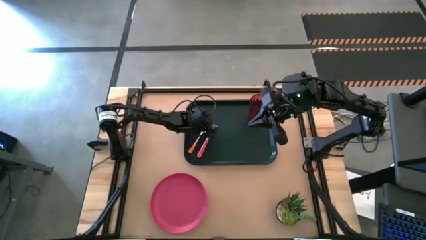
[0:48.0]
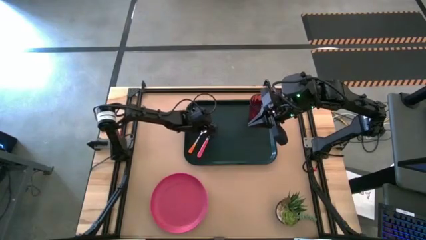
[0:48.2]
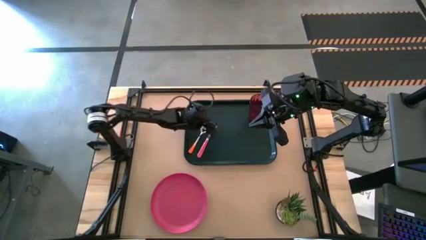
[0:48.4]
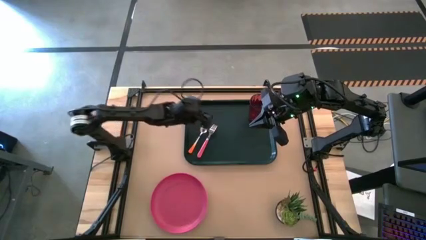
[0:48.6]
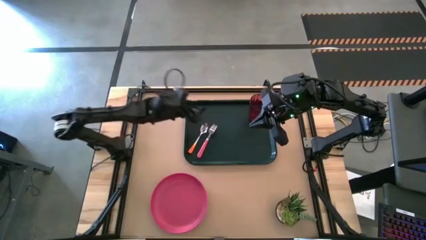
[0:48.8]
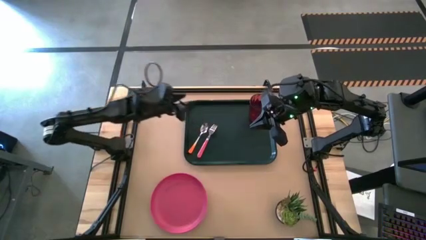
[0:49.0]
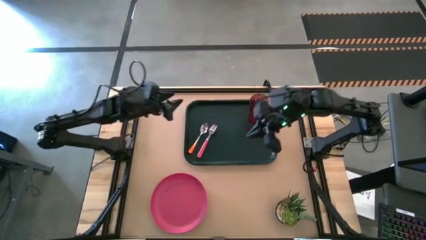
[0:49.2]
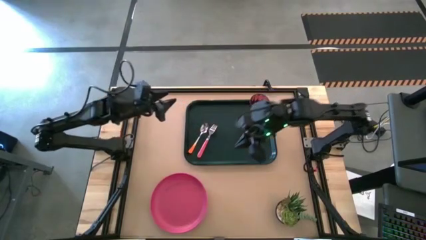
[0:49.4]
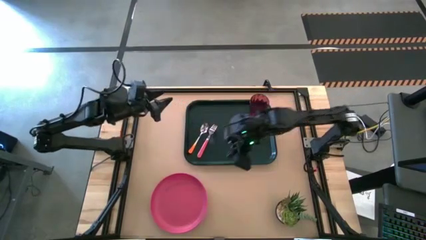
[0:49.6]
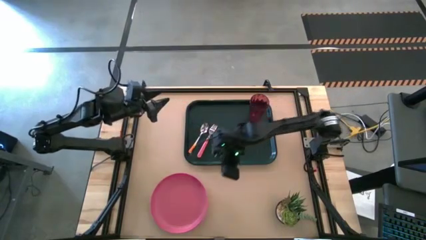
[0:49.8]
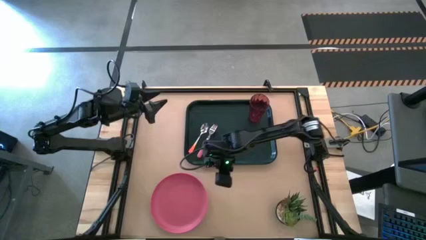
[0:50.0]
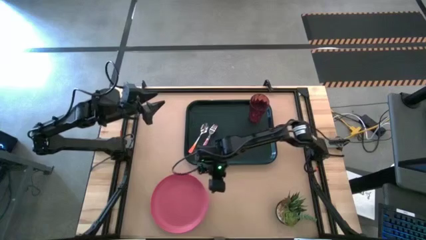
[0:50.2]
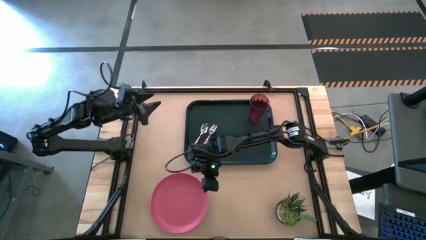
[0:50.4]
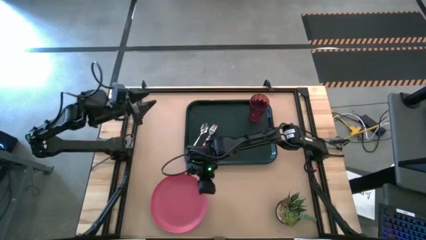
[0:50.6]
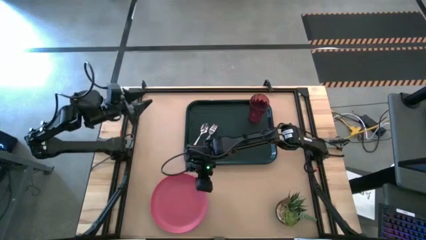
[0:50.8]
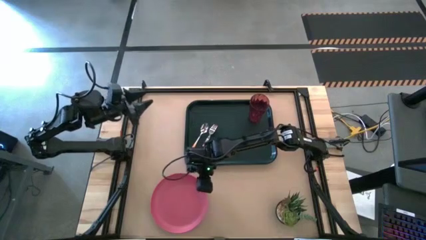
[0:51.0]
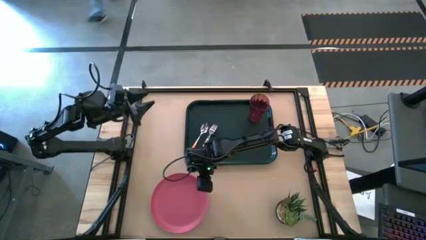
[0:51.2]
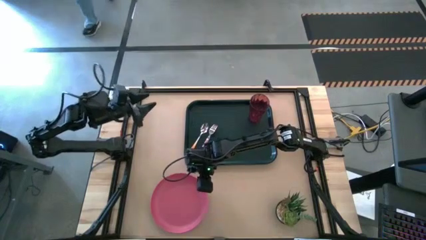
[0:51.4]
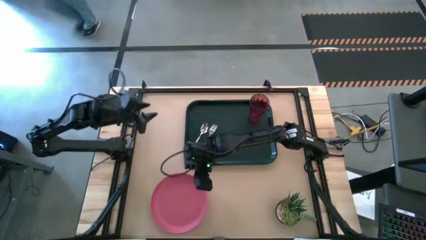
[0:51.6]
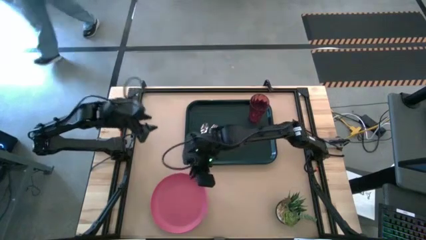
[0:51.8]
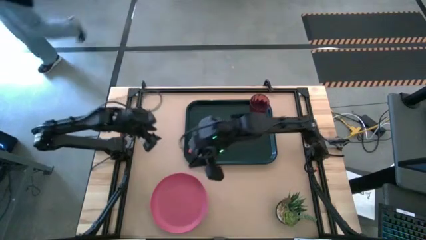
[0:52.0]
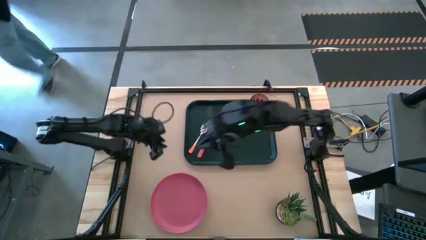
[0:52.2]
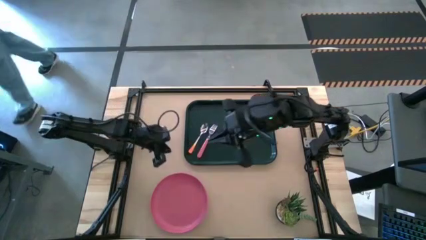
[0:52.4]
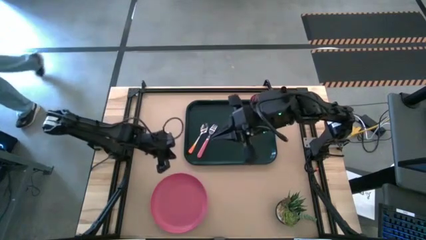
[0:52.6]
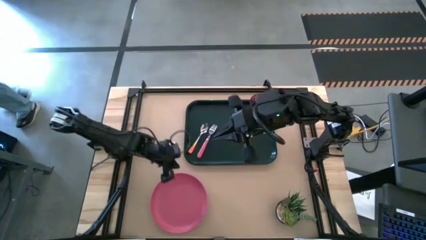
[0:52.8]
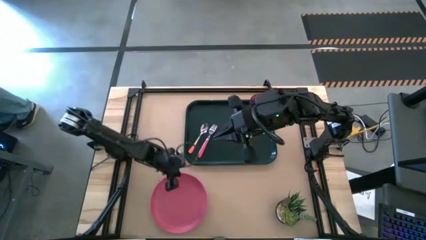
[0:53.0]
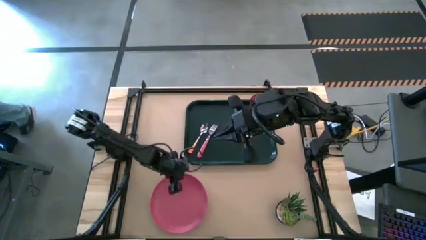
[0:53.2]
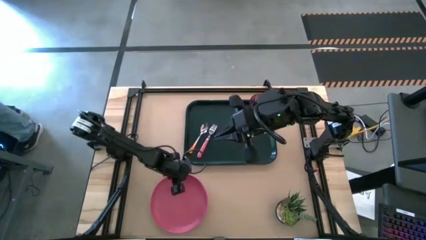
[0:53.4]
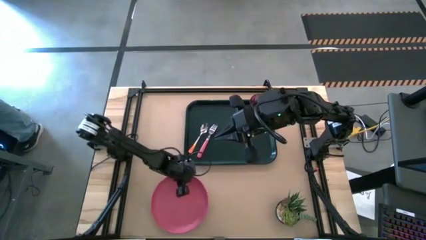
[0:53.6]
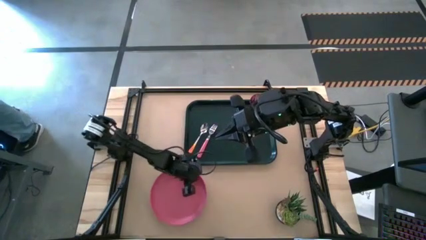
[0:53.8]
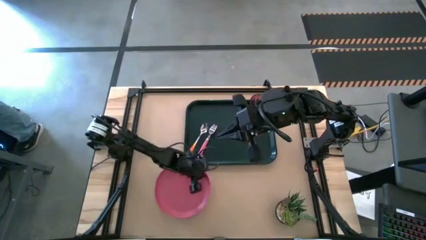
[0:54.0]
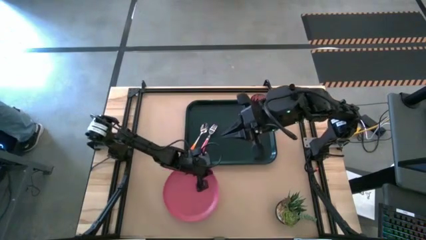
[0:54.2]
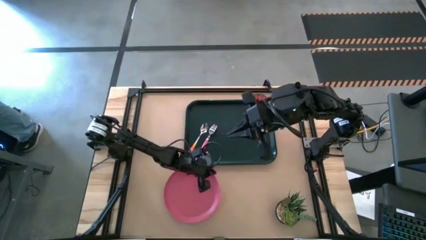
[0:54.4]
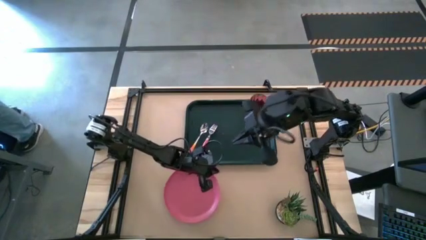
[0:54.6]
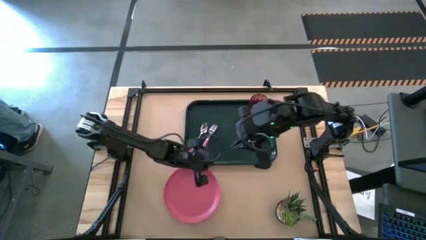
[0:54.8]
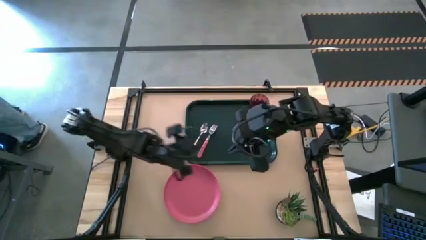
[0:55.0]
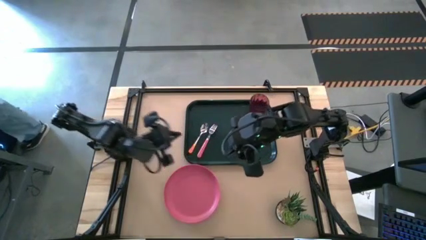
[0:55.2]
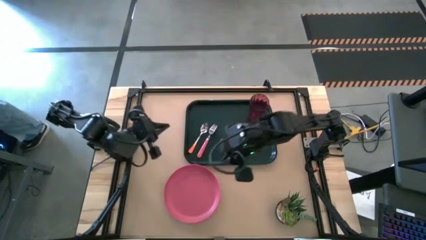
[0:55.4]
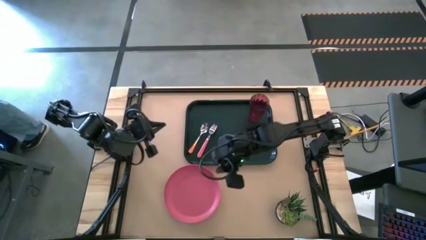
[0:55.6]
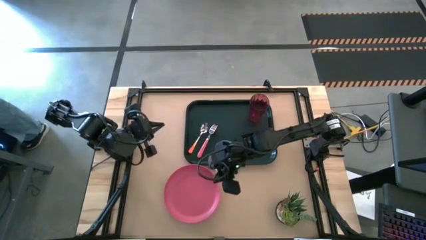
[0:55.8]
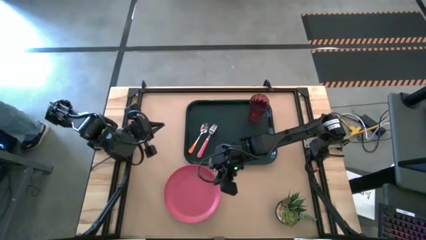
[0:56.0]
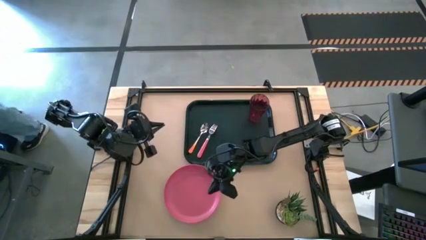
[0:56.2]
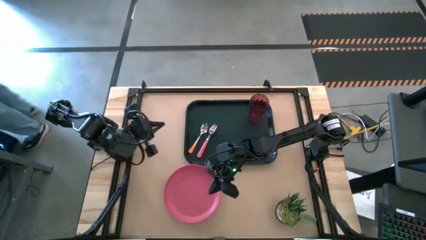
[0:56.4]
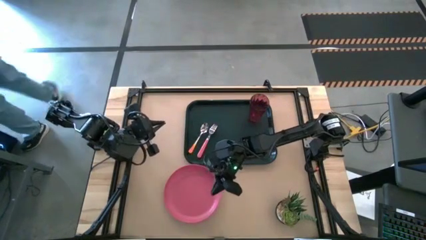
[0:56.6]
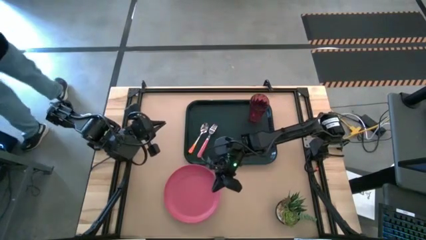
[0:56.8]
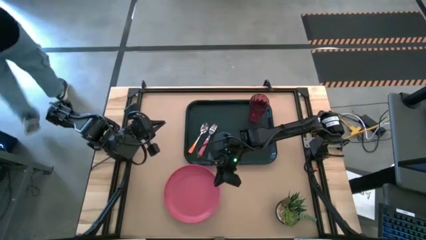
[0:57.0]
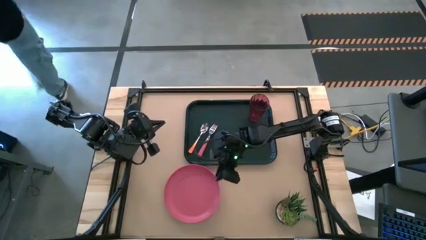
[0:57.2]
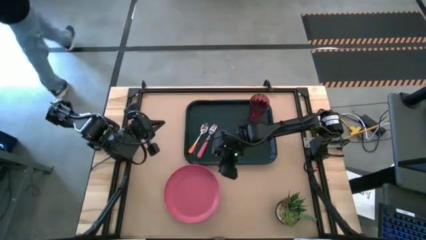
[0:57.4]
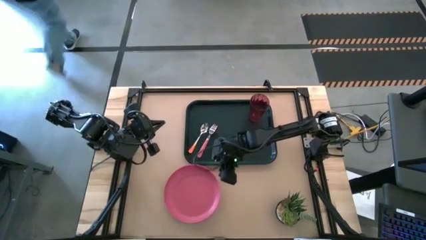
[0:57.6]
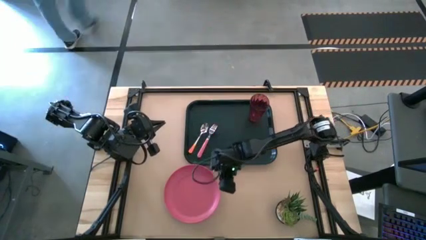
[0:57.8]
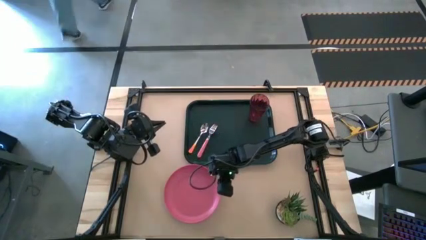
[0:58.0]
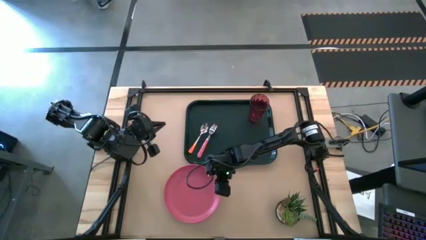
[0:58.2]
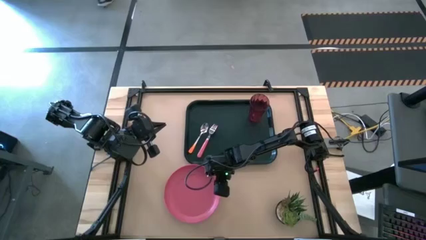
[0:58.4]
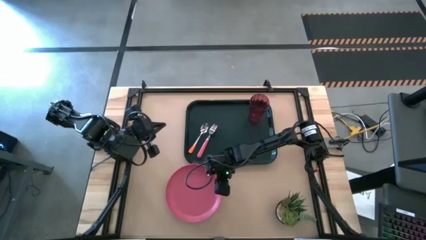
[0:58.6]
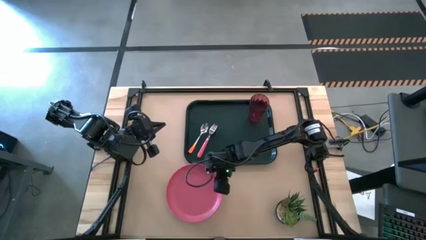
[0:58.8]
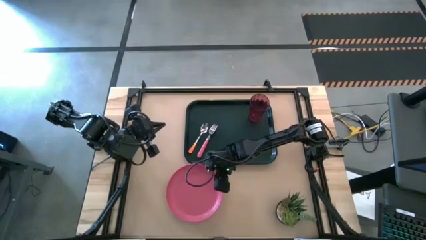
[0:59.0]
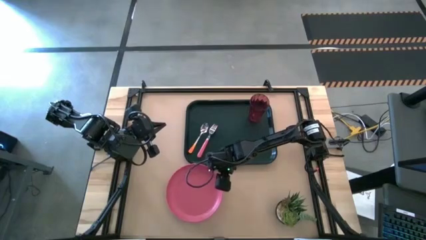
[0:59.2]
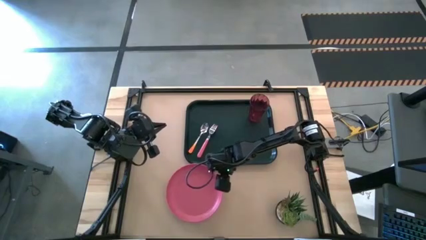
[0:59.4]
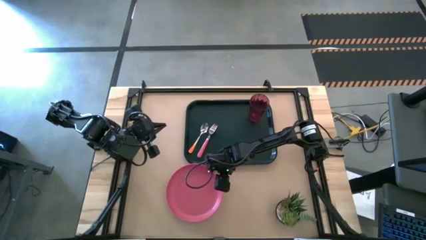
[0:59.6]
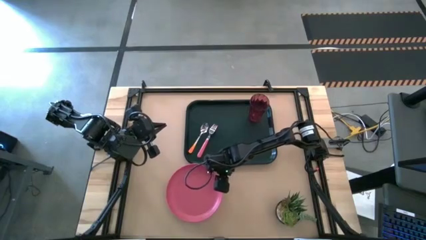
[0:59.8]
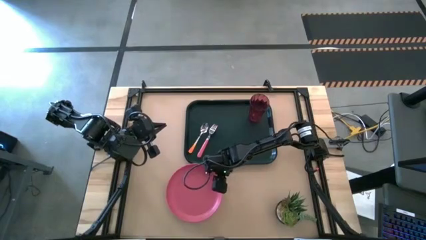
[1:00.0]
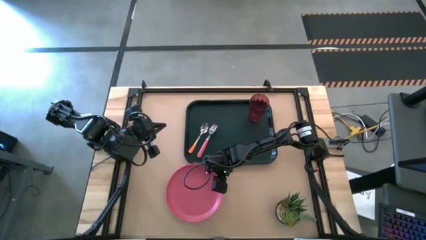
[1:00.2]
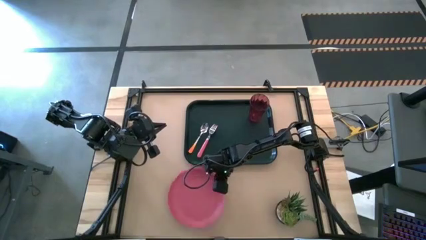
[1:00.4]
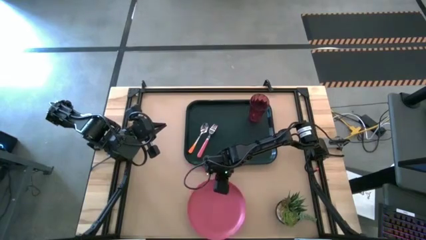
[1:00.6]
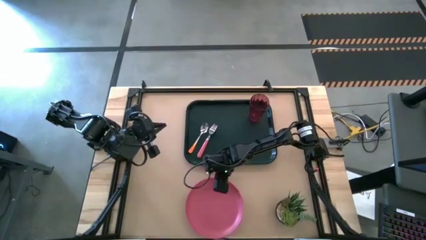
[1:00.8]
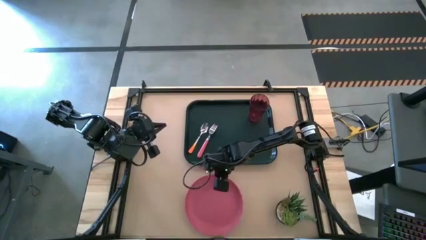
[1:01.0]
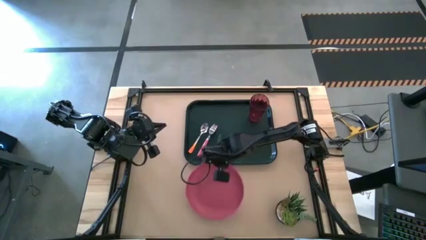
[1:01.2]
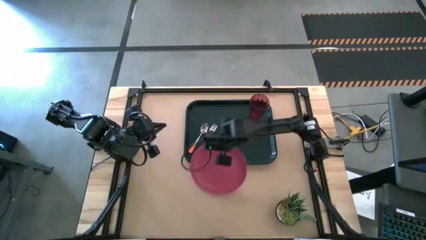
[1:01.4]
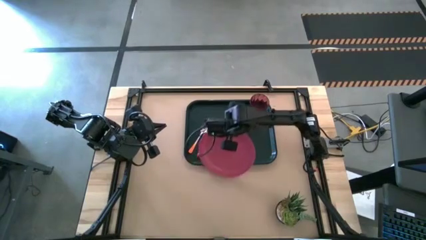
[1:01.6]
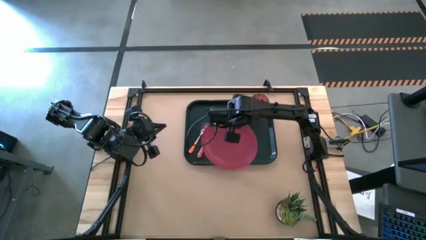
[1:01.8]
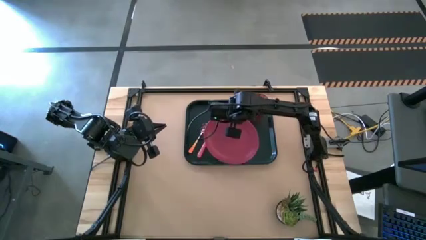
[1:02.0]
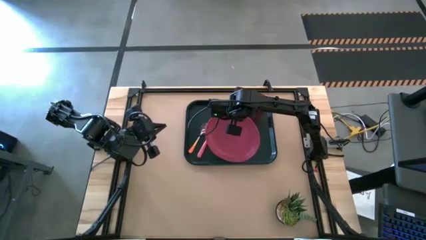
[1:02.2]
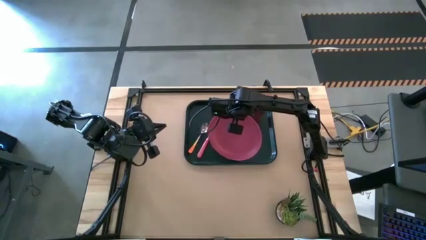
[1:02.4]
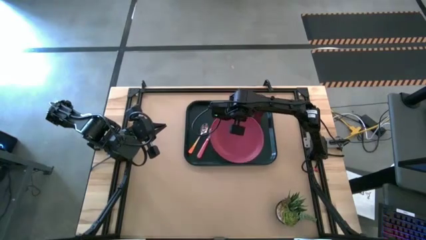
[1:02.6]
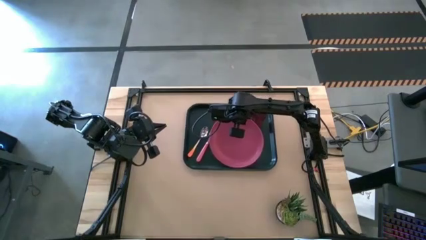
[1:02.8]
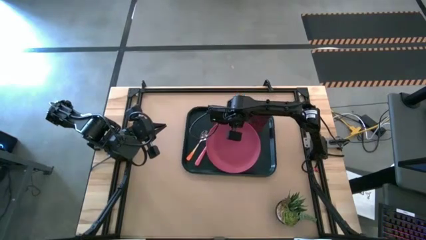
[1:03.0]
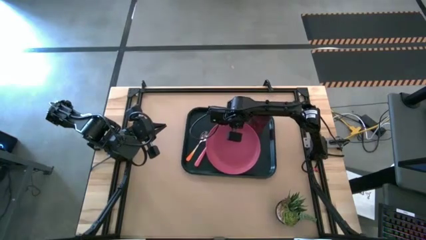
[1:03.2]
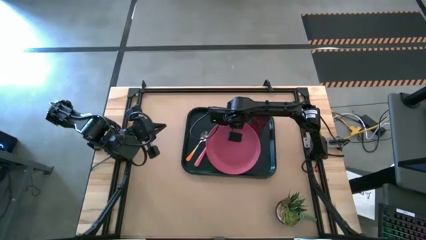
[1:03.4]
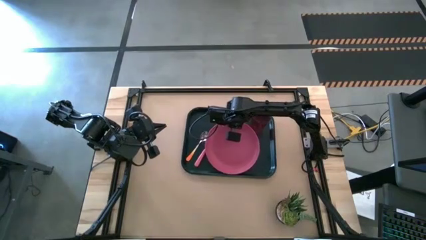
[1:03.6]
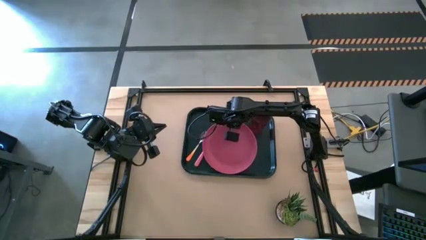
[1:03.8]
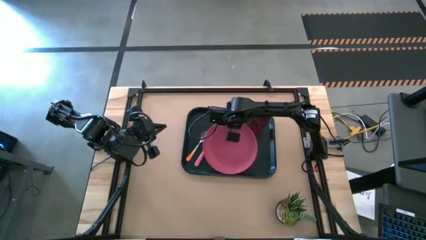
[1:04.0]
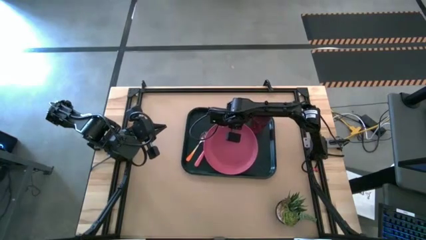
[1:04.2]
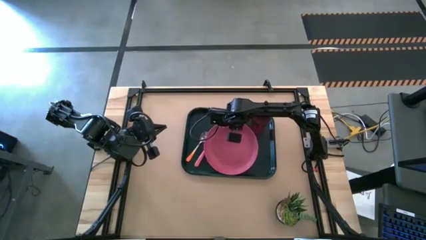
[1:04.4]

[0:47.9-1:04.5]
Task: Pick and place plate/cup/fork/spoon on tray
Put the pink plate on the black serving tray to the left of the pink fork
